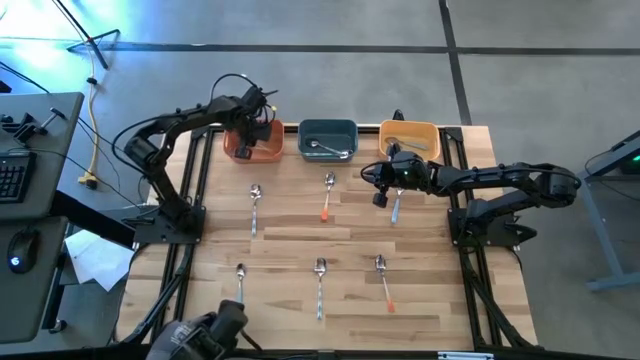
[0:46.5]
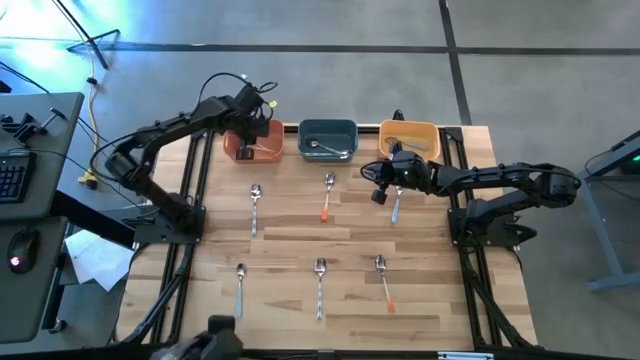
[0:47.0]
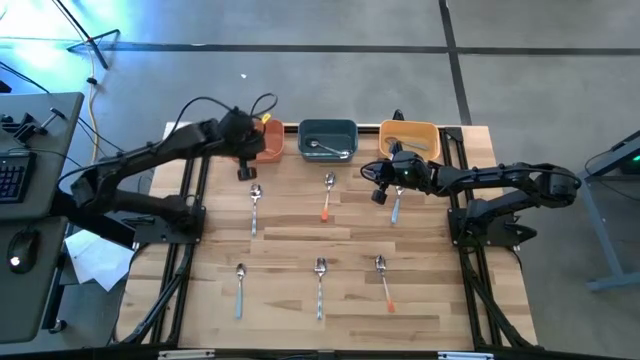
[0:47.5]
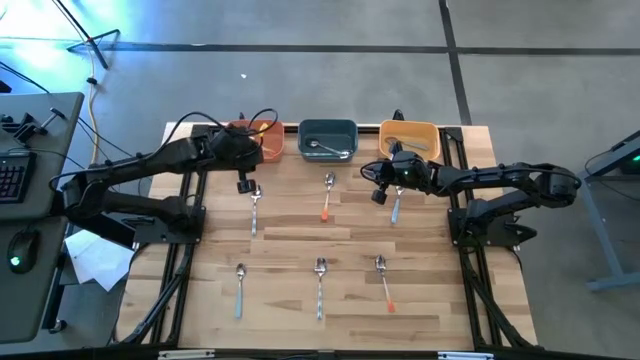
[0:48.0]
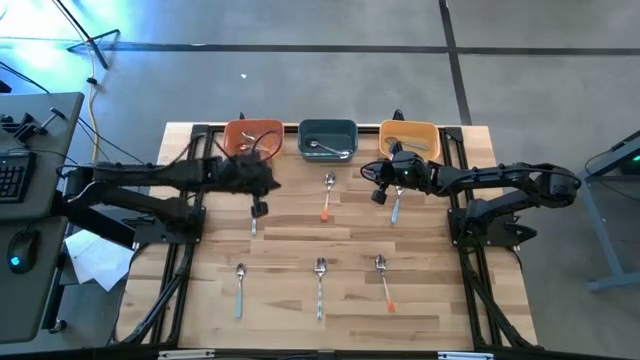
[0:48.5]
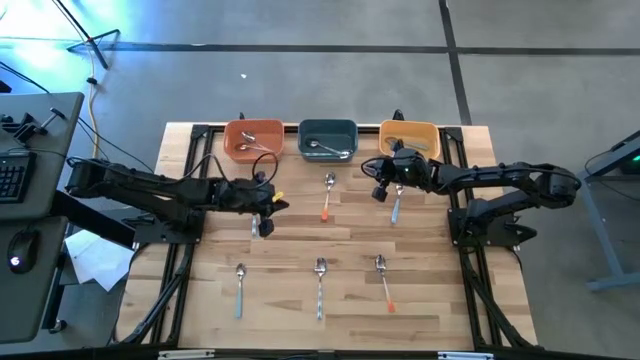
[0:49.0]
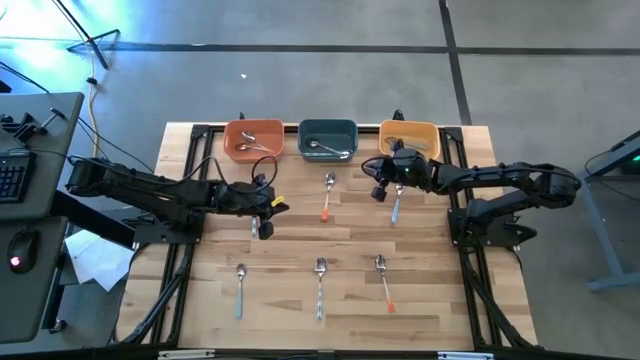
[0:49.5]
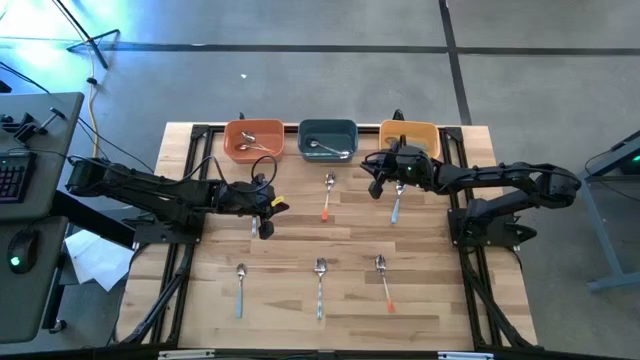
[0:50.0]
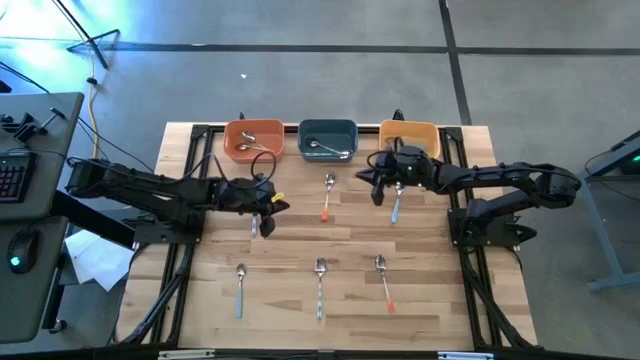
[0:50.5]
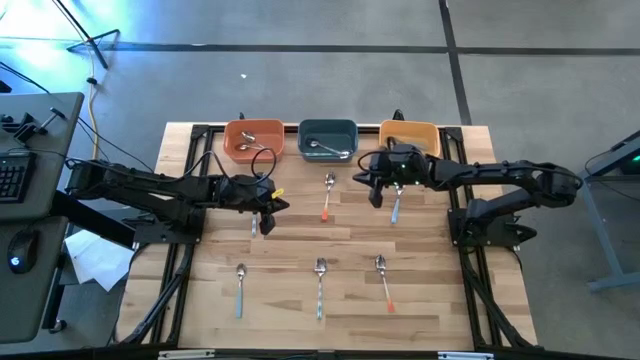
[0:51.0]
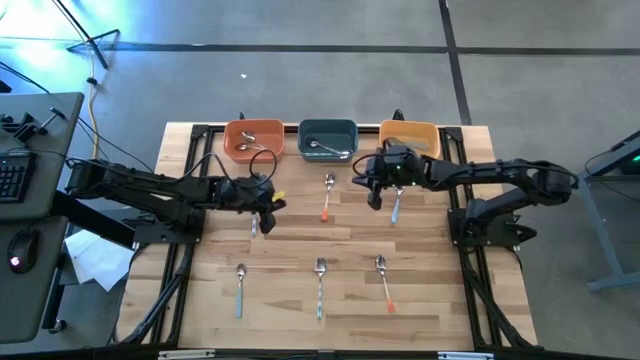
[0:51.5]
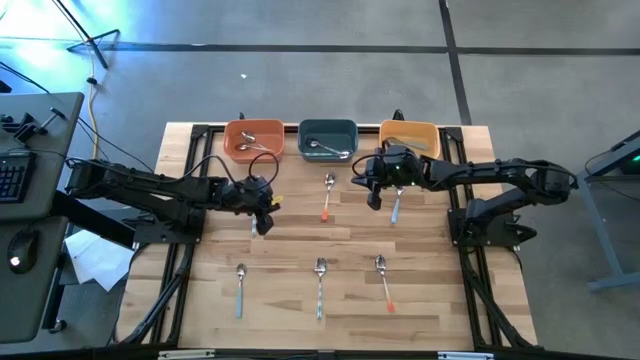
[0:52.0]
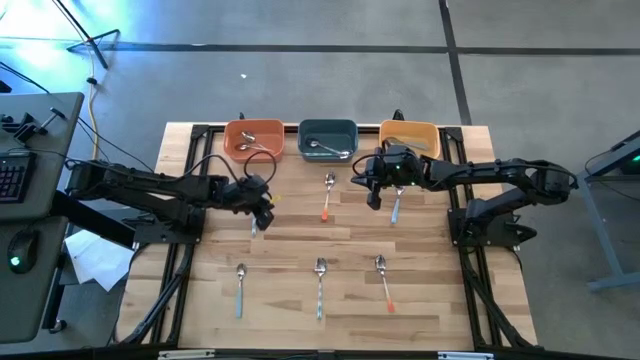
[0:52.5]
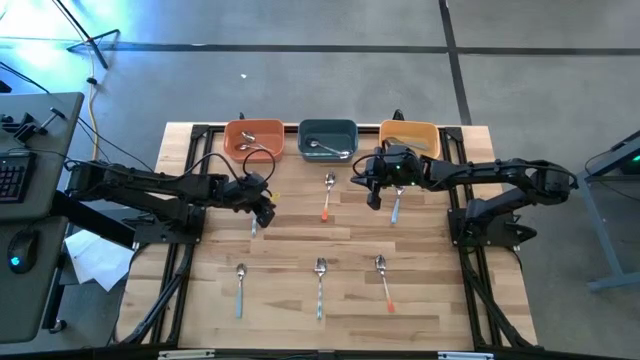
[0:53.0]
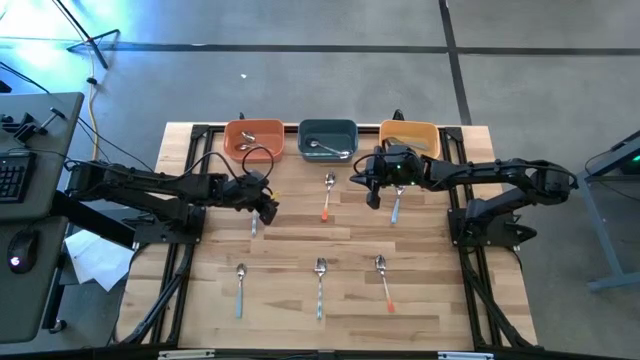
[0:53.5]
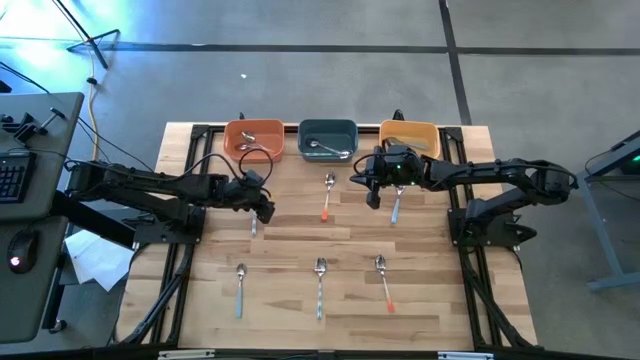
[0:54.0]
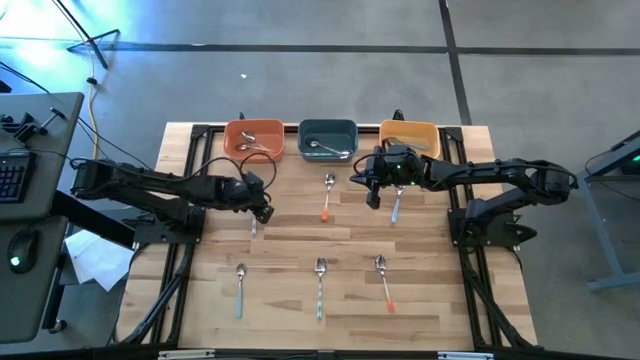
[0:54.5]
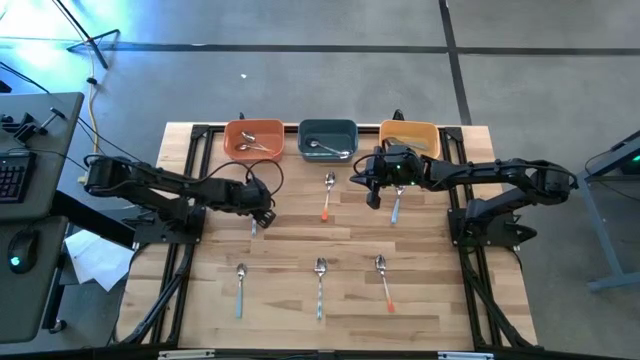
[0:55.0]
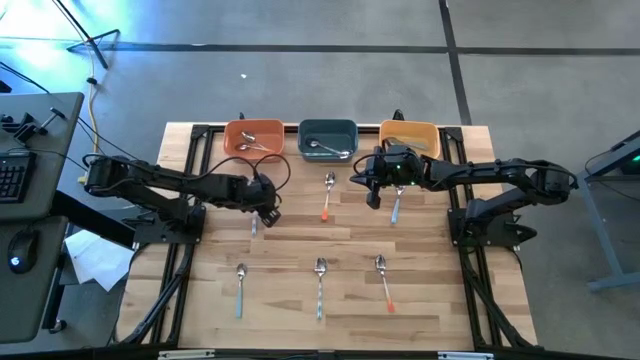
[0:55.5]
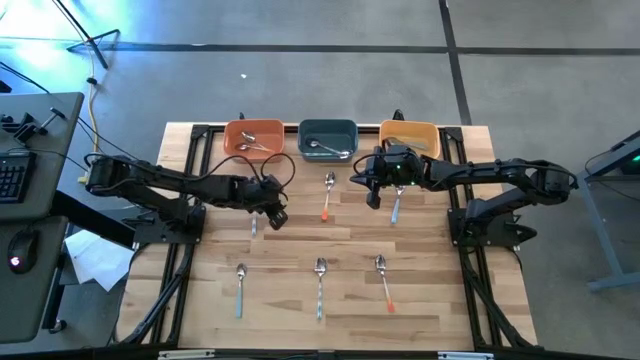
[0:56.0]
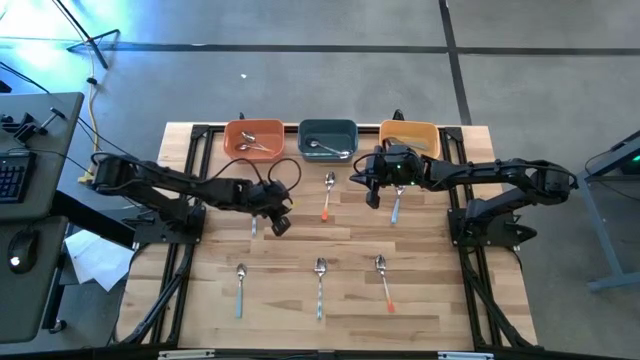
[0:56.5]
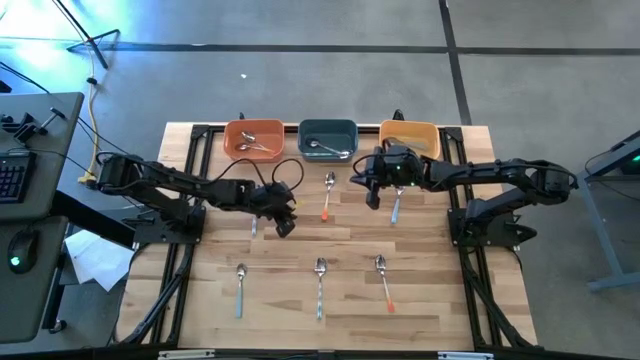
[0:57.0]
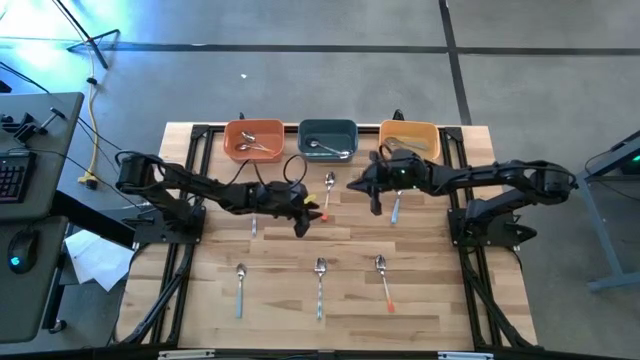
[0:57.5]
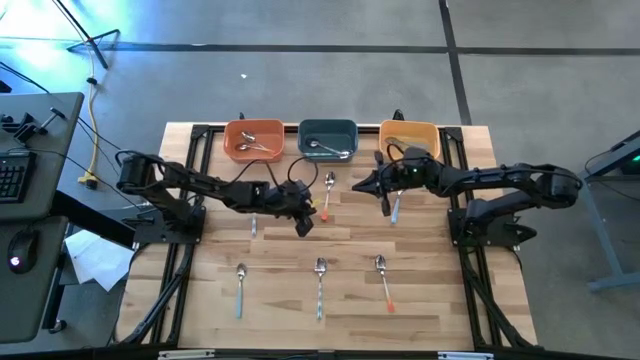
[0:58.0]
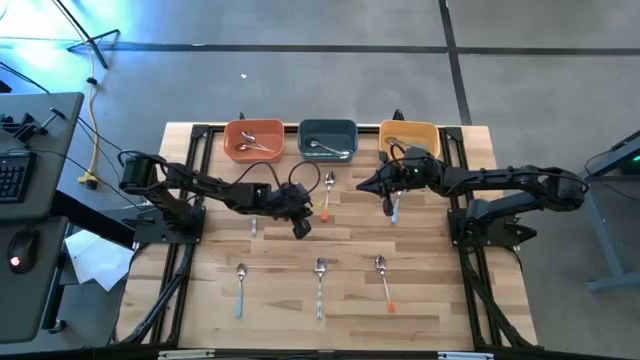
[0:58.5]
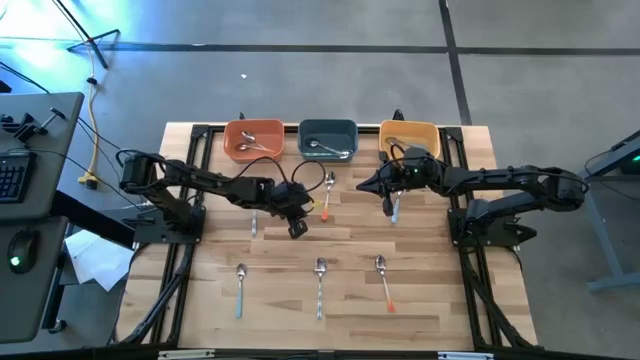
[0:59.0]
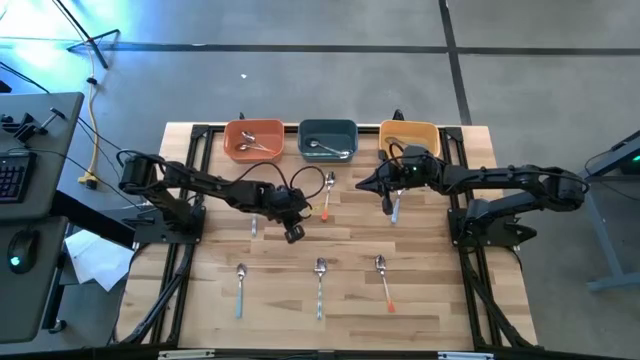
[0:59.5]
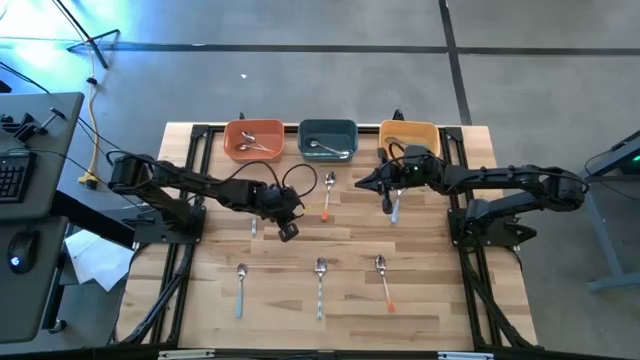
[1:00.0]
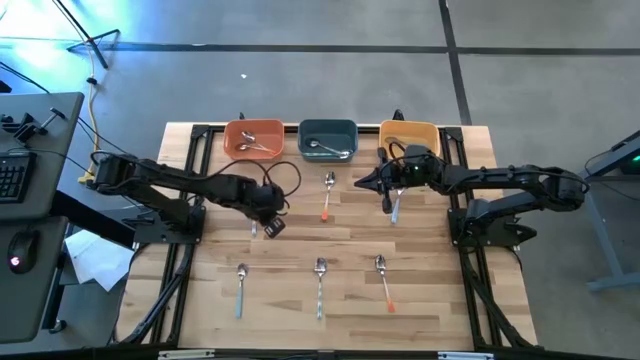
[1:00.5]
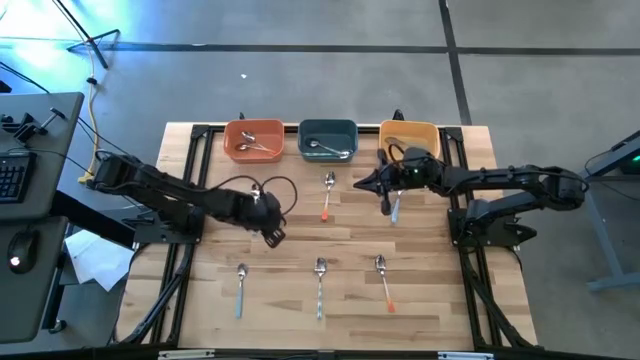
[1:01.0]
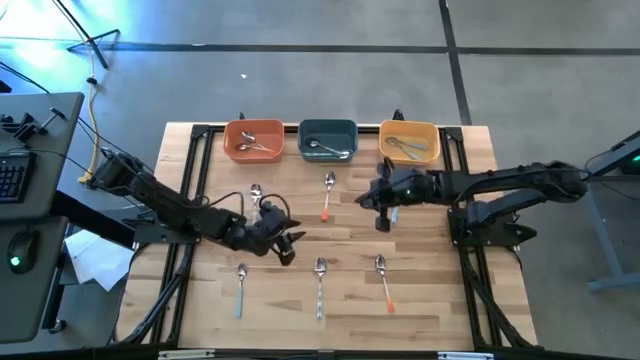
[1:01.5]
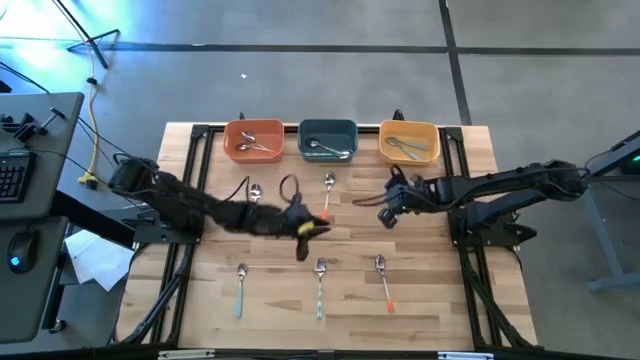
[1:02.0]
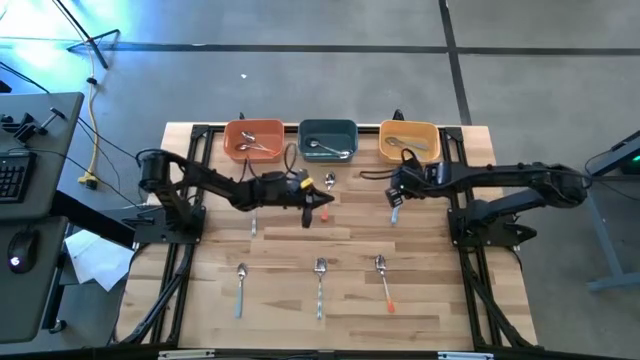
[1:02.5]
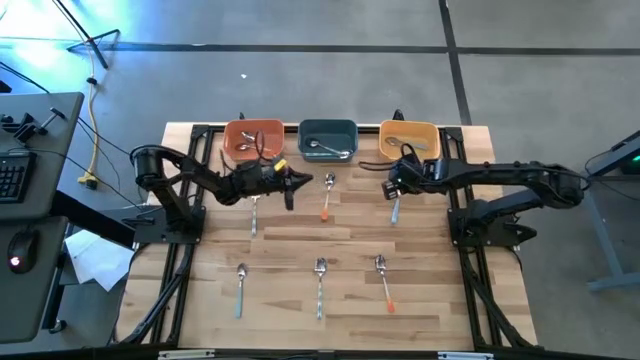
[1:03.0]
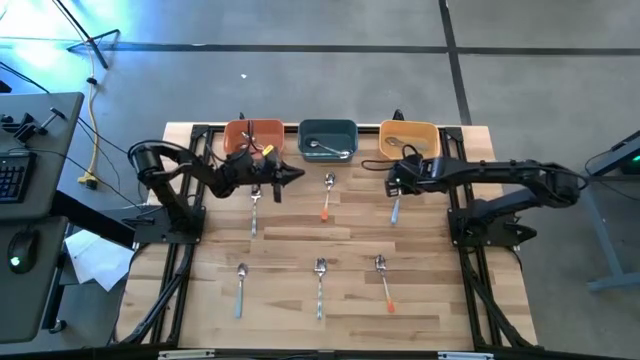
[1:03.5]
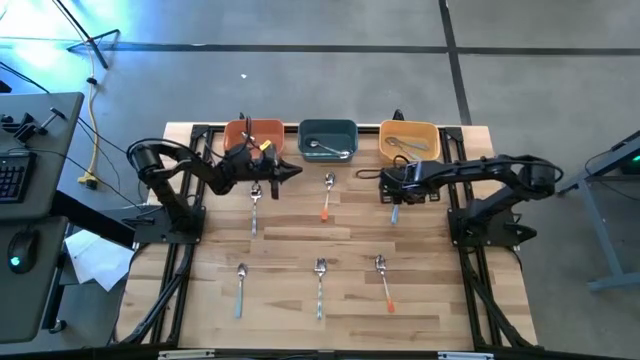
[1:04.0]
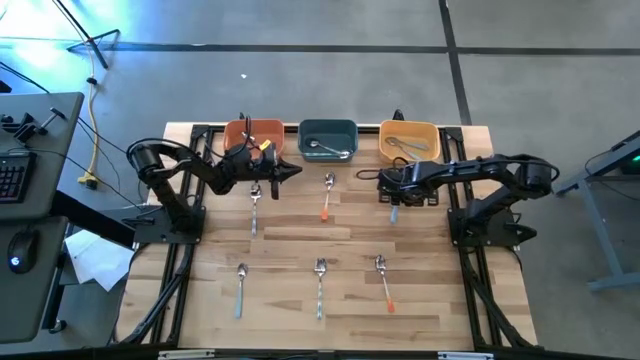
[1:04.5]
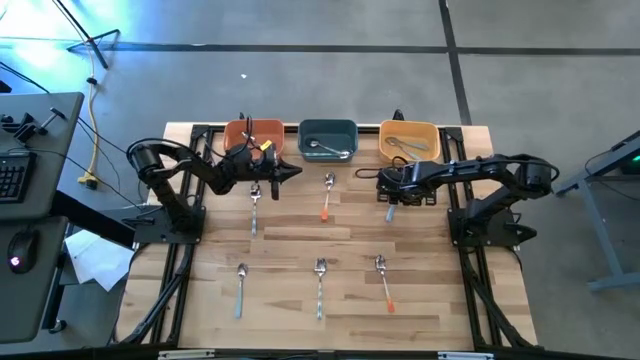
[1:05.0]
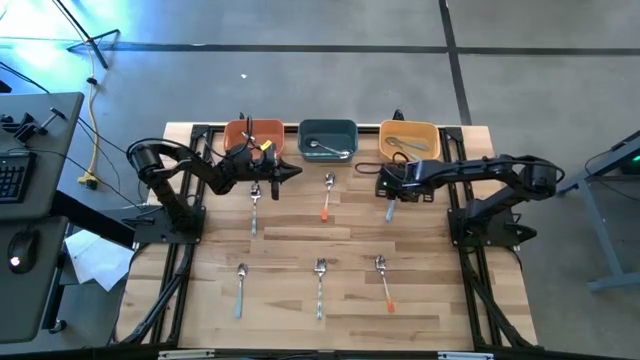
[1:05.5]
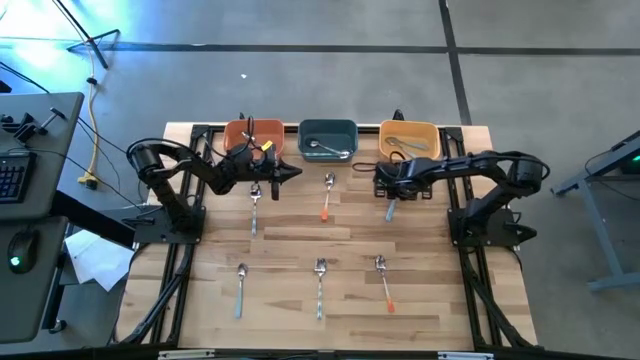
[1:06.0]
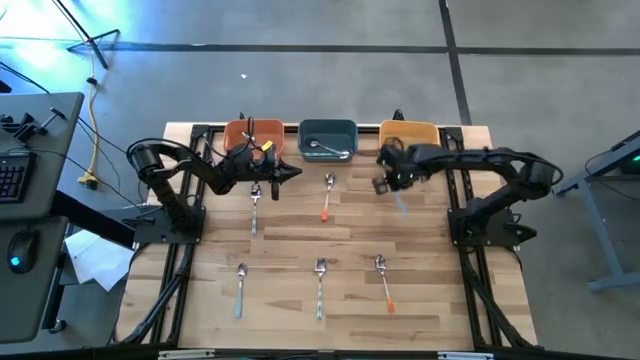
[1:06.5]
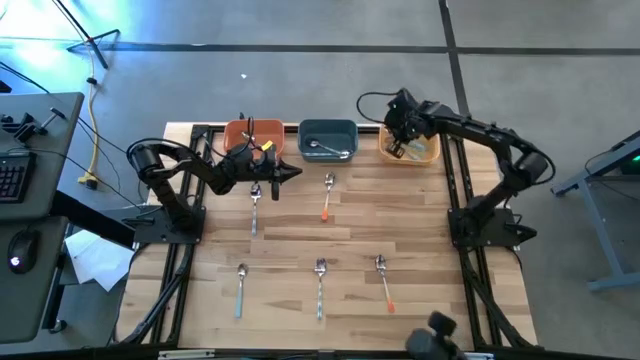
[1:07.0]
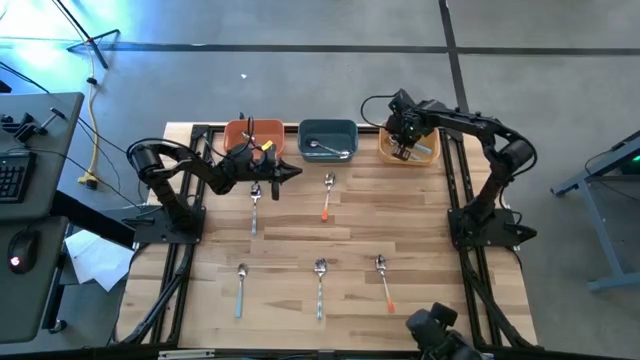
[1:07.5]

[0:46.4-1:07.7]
Task: Sort silverware by color (type)
Put the blue spoon into the yellow bin
